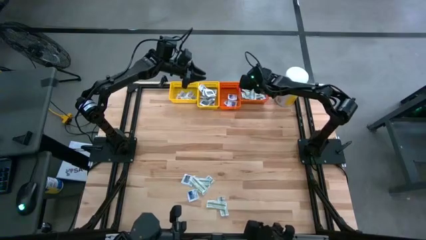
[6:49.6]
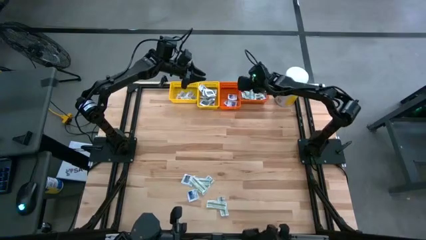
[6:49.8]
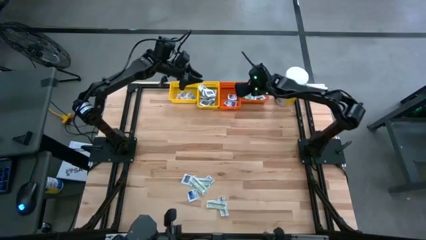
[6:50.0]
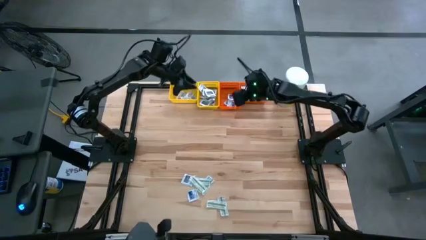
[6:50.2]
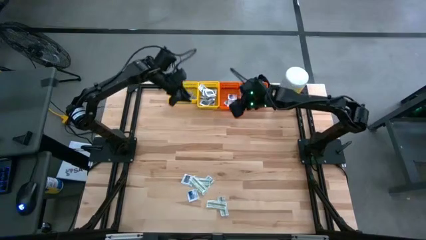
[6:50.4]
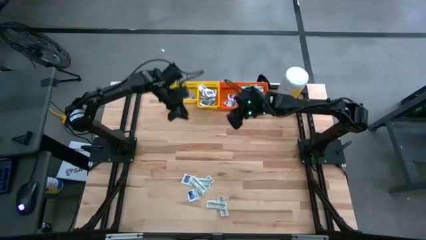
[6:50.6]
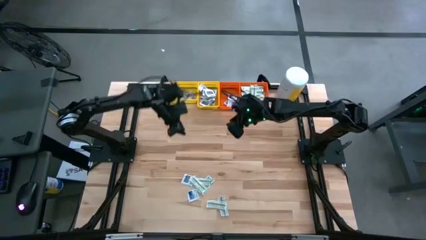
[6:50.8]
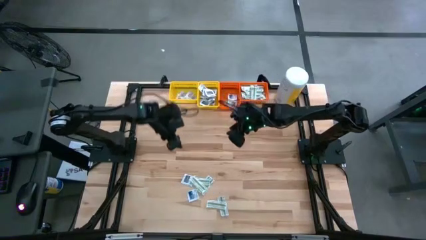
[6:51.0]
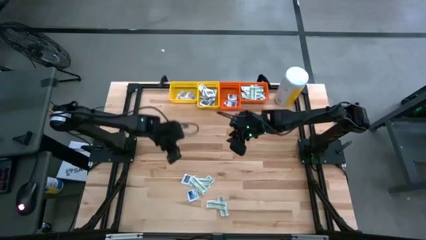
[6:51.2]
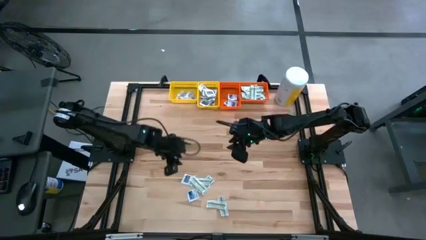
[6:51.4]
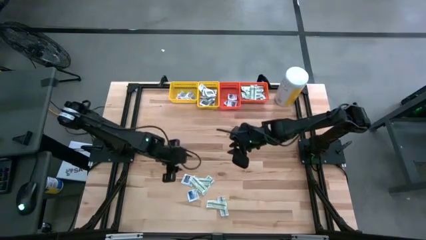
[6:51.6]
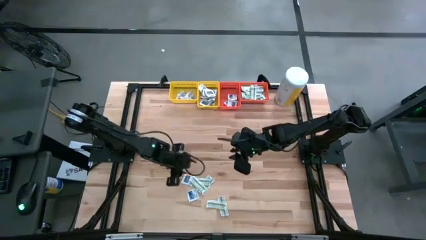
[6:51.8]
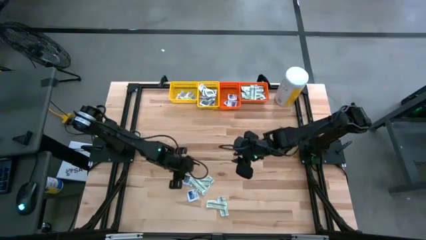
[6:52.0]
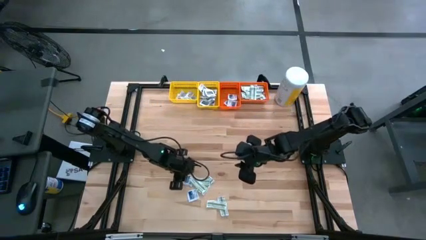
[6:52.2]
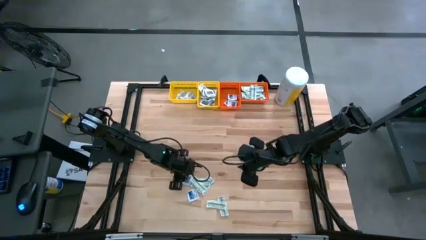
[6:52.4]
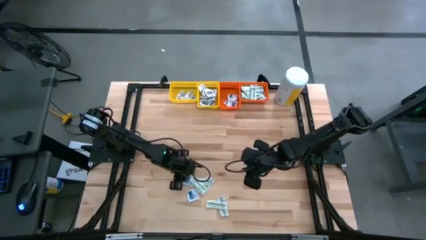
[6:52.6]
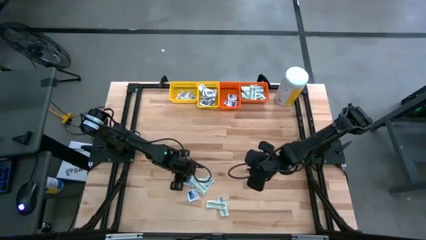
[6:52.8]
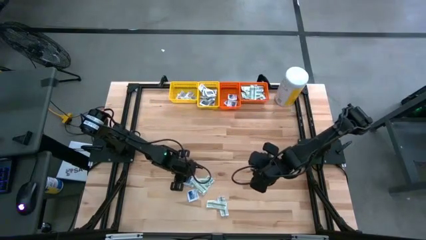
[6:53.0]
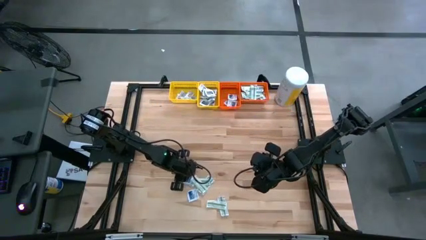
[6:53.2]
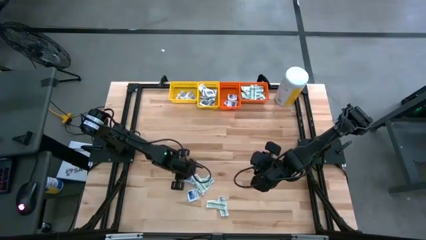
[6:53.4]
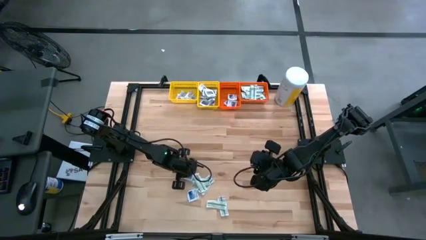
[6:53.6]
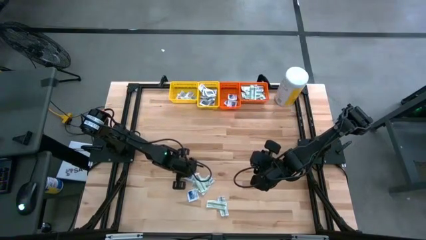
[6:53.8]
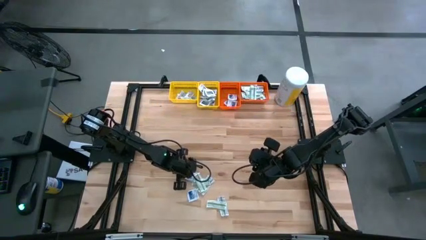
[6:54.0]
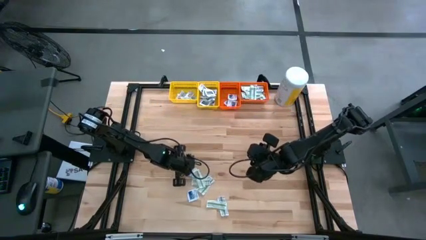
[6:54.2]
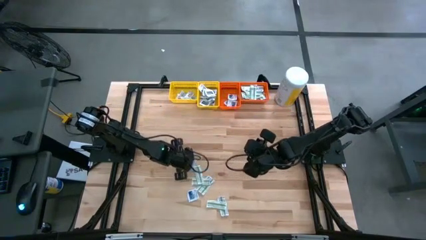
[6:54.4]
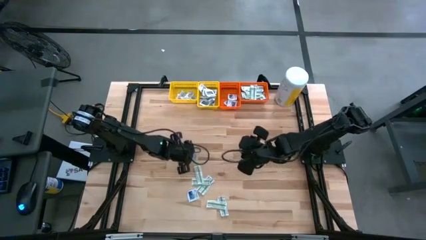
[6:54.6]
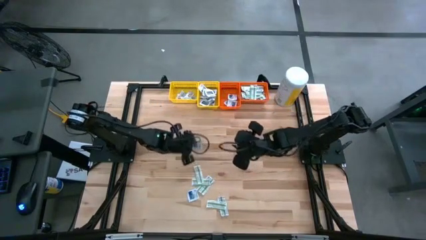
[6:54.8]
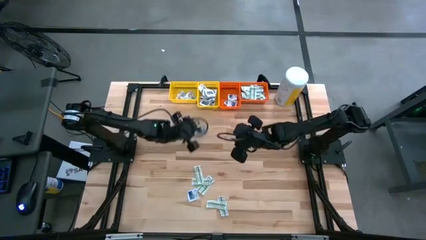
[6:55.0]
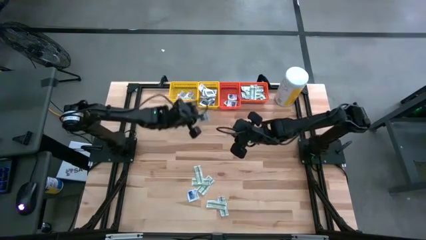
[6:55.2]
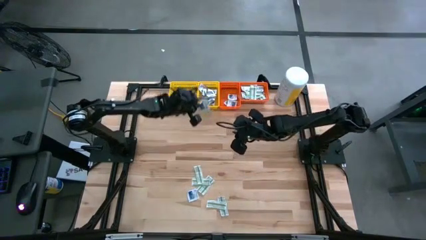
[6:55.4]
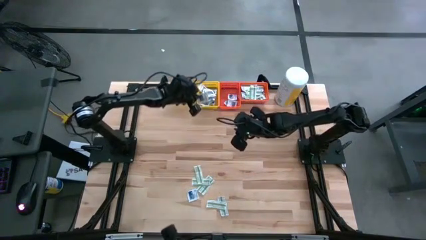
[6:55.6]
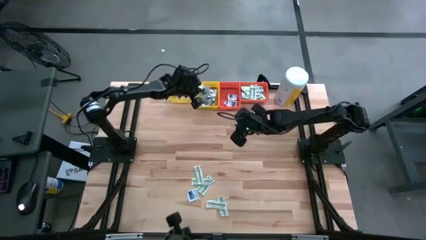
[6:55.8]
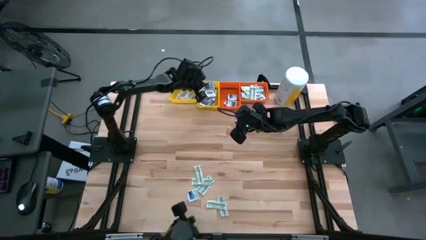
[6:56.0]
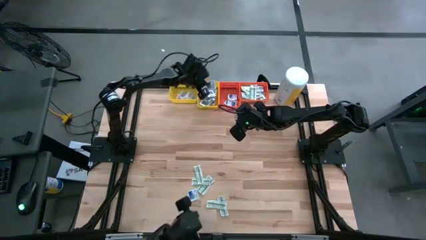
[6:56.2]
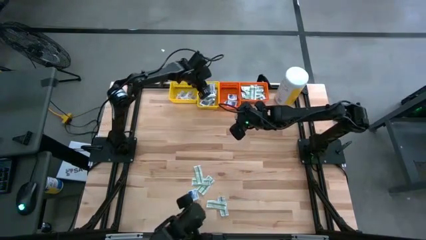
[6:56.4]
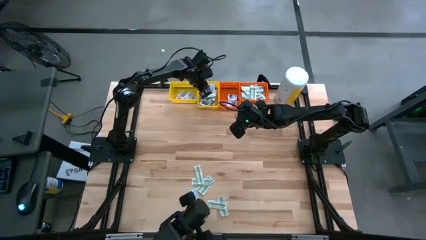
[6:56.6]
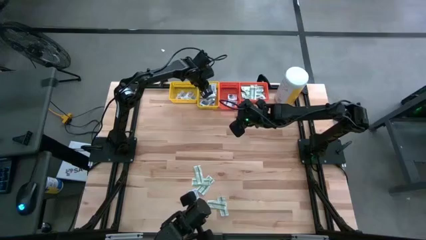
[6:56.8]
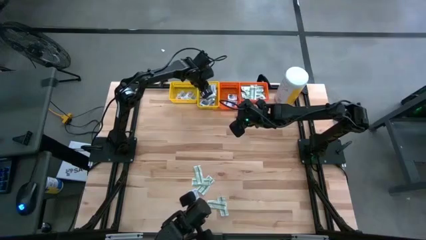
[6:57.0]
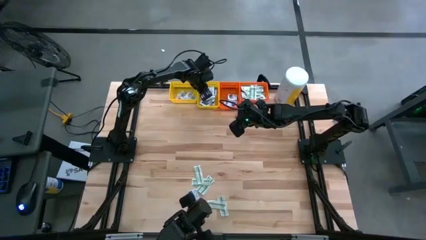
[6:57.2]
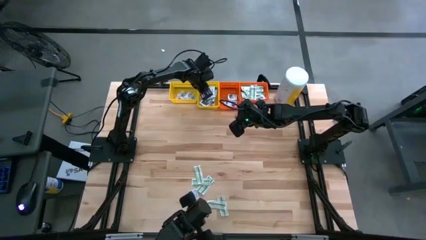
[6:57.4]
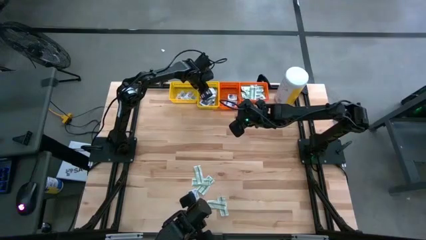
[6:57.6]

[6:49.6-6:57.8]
Task: Pick & Place First Aid Supplies
Put the gray packet into the right yellow bin

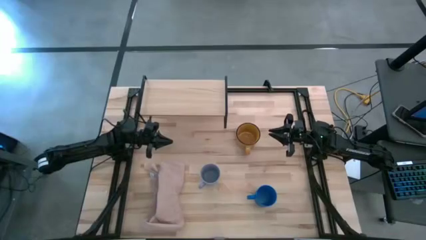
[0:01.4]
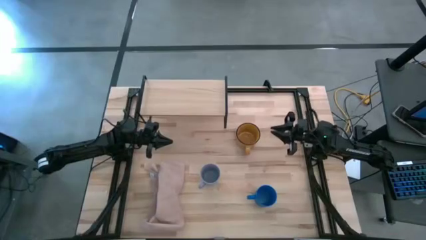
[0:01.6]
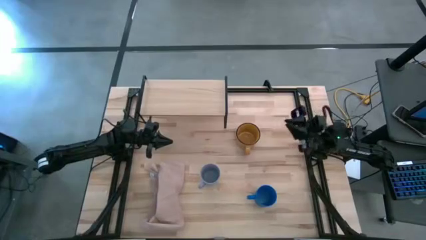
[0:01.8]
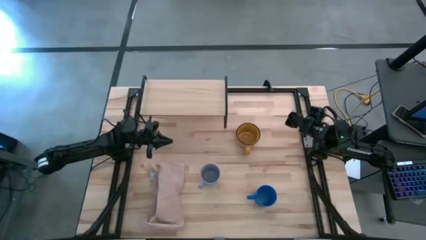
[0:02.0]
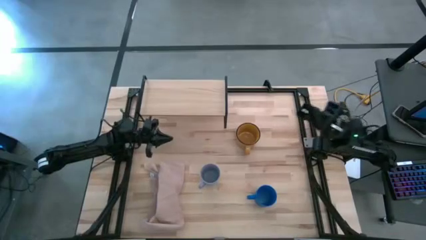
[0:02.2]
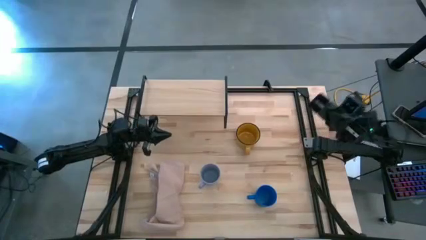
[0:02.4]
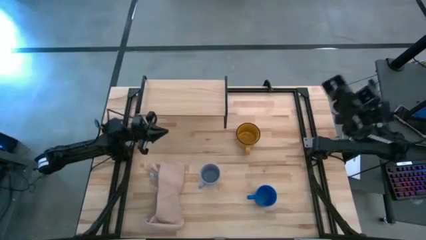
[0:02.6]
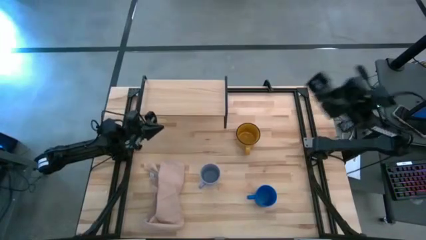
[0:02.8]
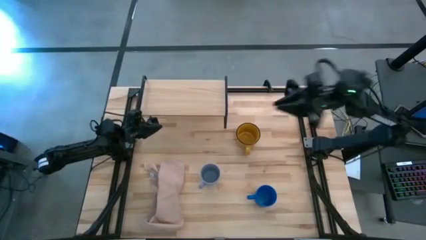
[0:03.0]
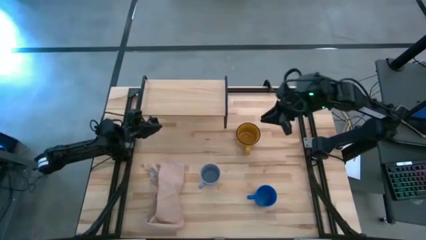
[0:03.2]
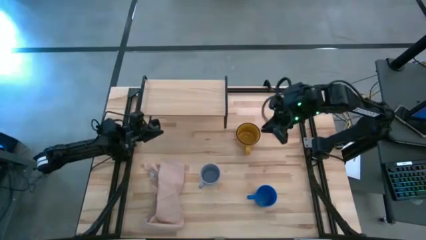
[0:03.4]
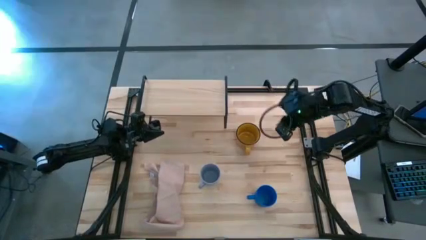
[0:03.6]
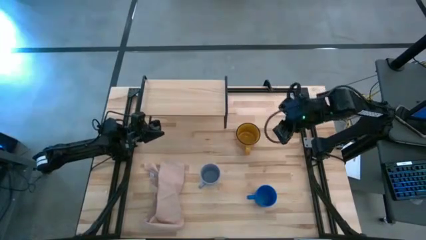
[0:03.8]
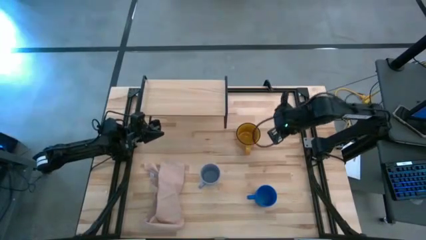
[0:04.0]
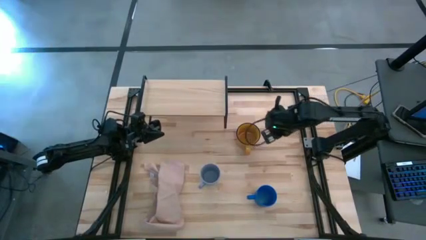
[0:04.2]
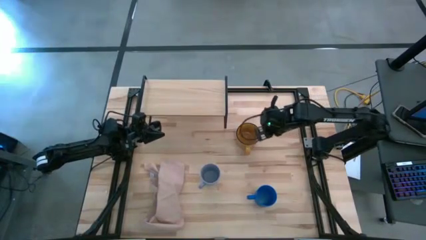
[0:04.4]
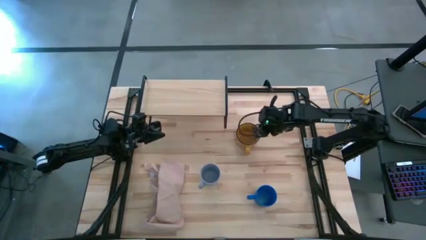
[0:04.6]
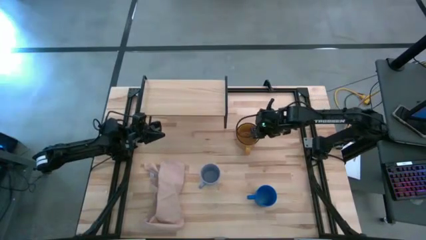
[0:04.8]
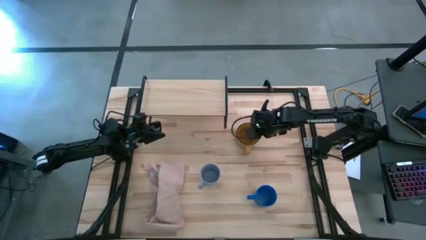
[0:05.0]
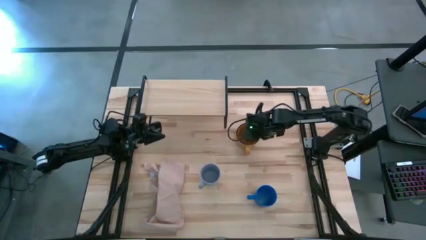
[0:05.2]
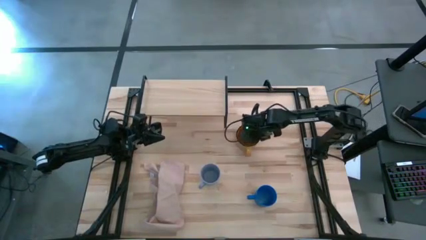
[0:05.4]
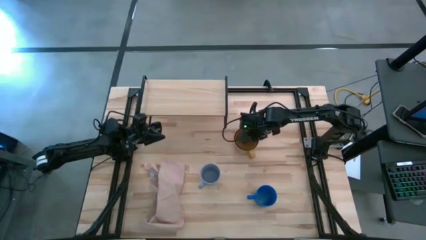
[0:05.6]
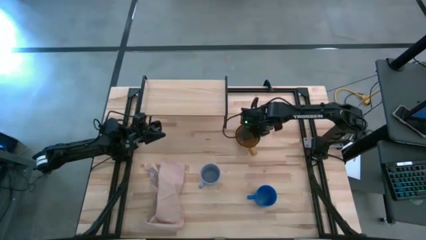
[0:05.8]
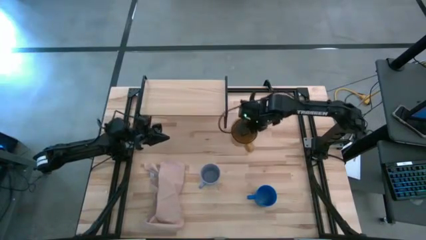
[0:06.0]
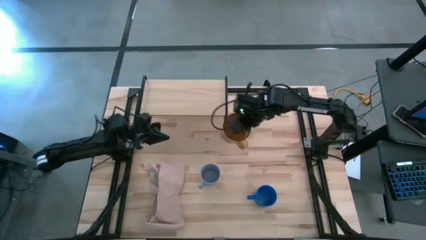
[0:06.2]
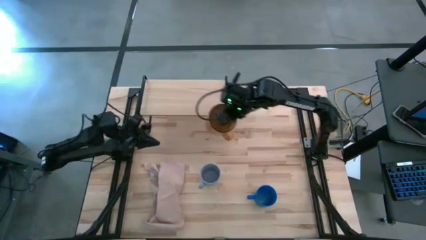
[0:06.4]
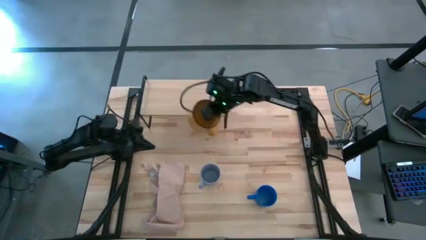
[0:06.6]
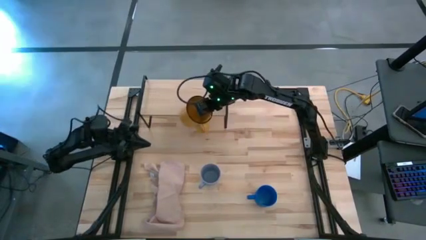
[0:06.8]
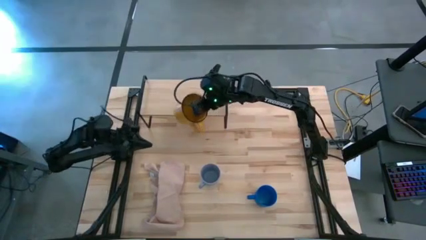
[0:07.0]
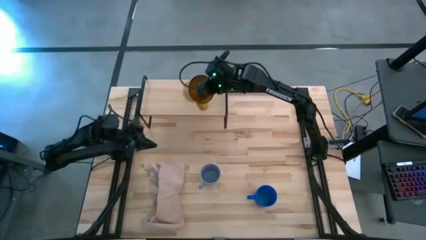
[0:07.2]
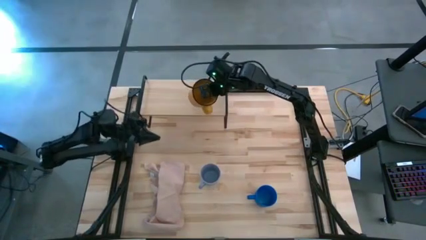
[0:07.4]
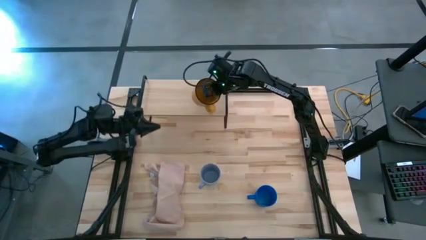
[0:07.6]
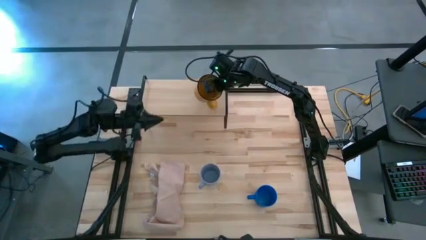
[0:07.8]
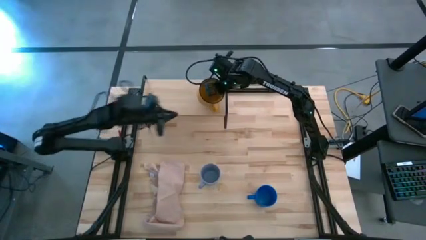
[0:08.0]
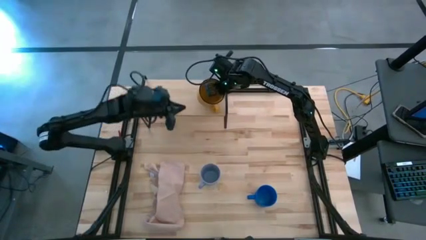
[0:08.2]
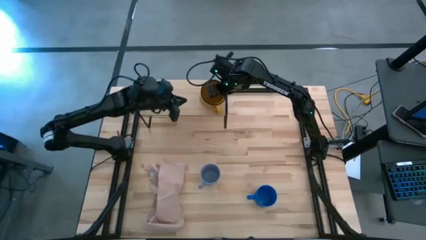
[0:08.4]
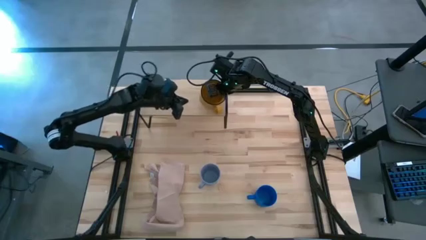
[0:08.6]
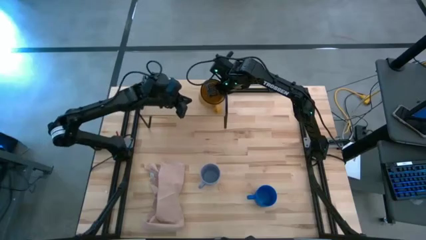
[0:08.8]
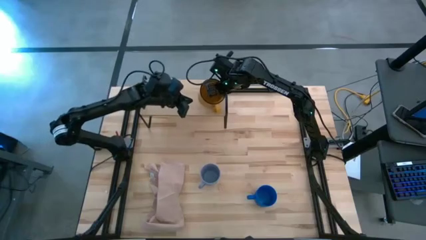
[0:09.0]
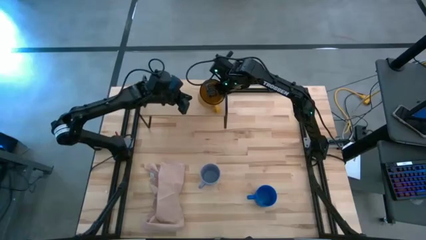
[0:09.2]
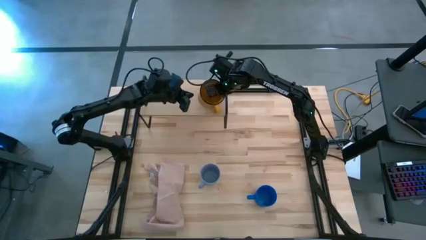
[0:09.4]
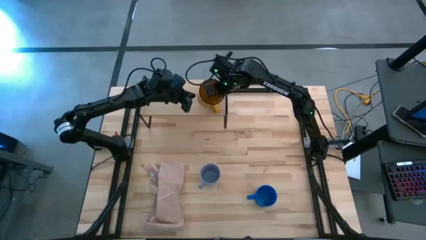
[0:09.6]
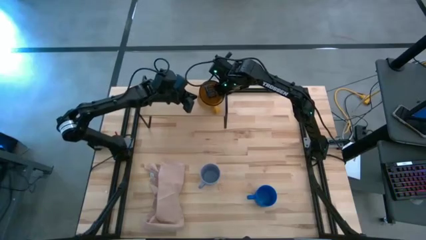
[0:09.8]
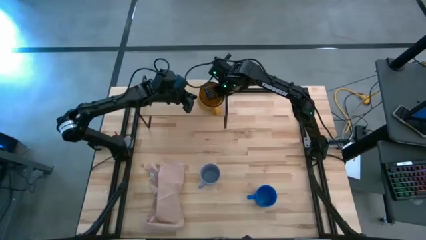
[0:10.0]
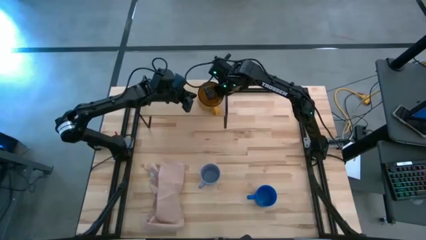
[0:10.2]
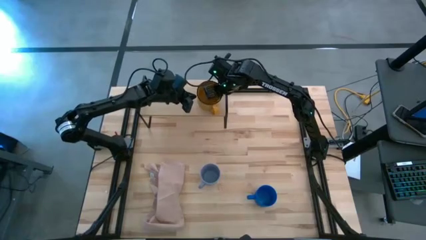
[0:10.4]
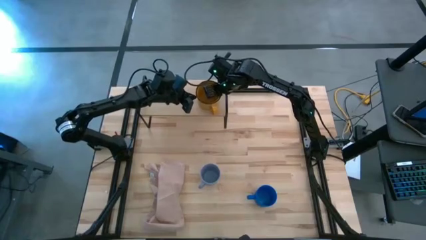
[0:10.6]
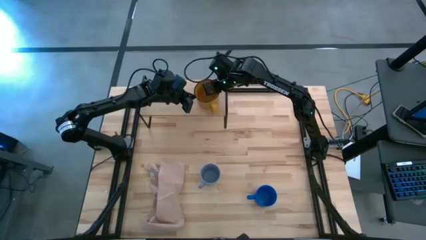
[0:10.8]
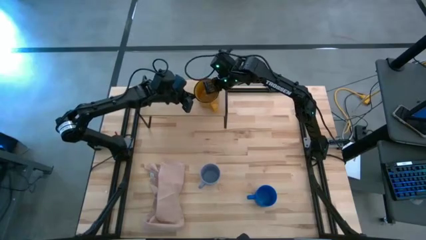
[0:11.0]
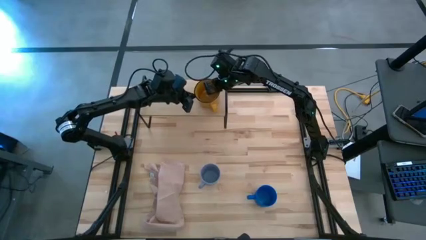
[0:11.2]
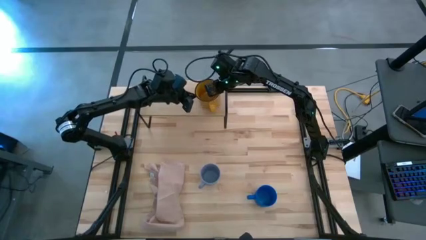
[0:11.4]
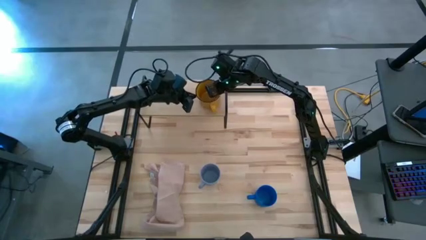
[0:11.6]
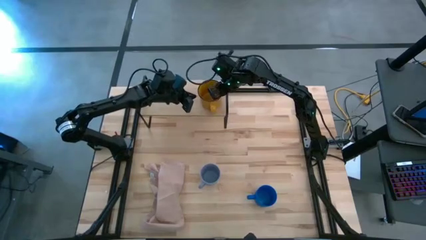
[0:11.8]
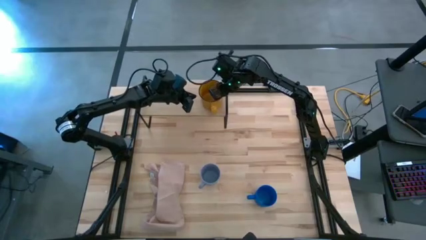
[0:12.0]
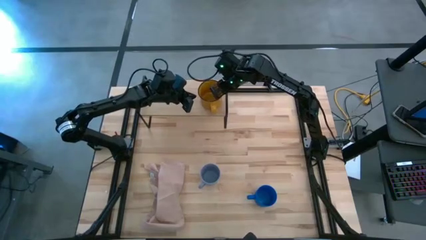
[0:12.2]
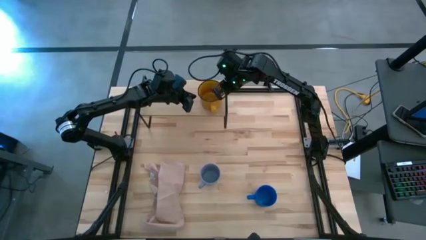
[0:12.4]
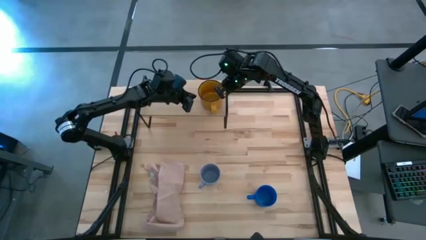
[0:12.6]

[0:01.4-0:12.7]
Task: Stack small to large cups/mugs on shelf
Put the yellow mug on the shelf
